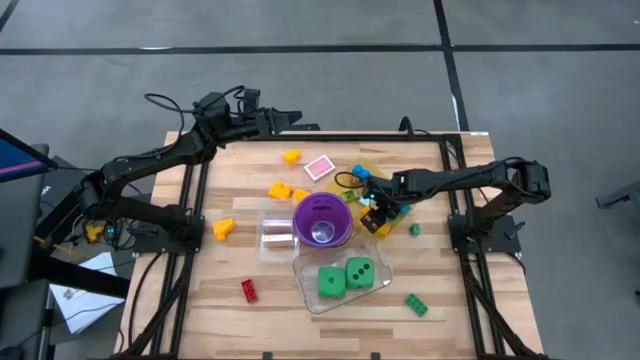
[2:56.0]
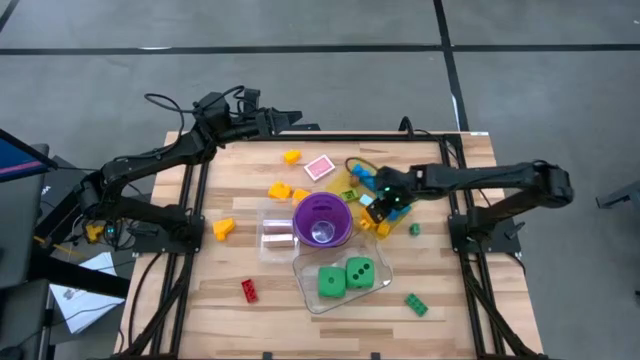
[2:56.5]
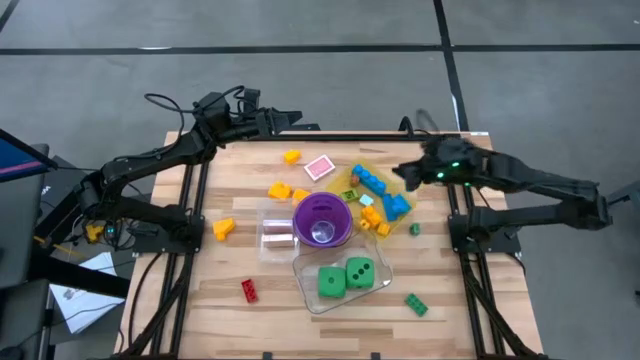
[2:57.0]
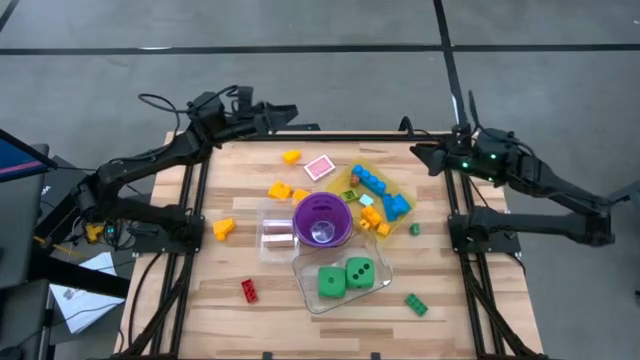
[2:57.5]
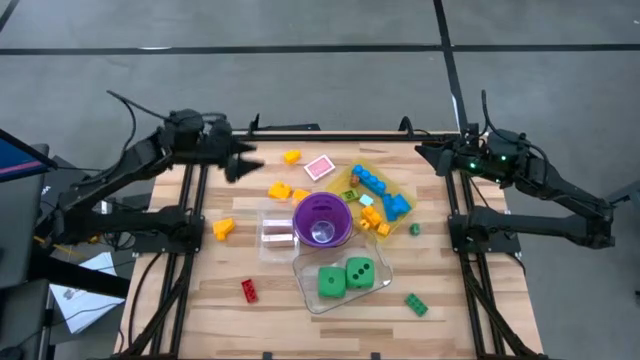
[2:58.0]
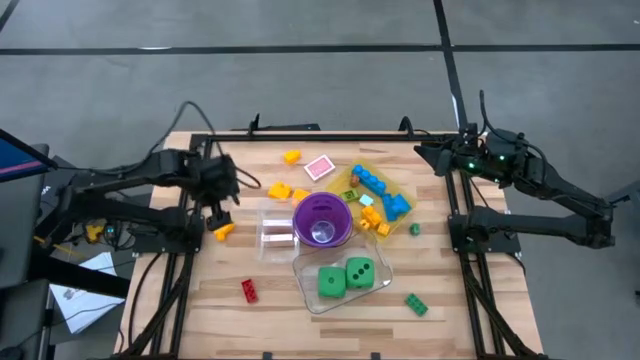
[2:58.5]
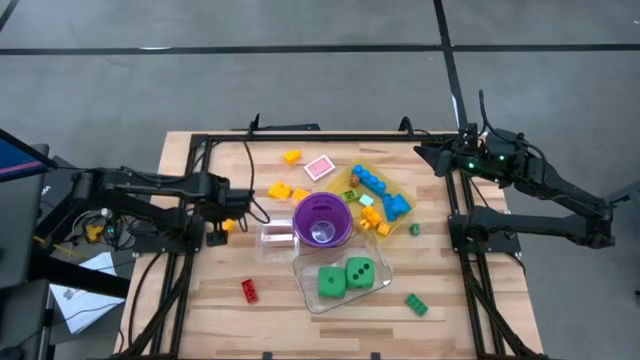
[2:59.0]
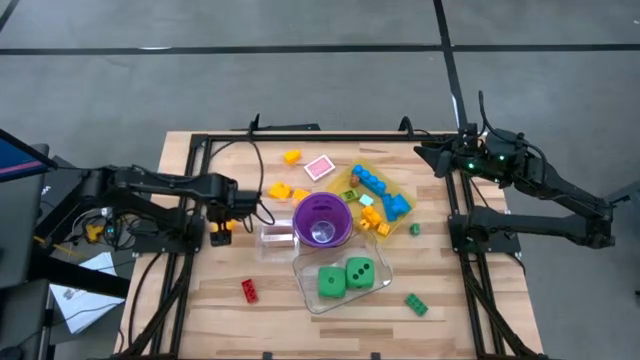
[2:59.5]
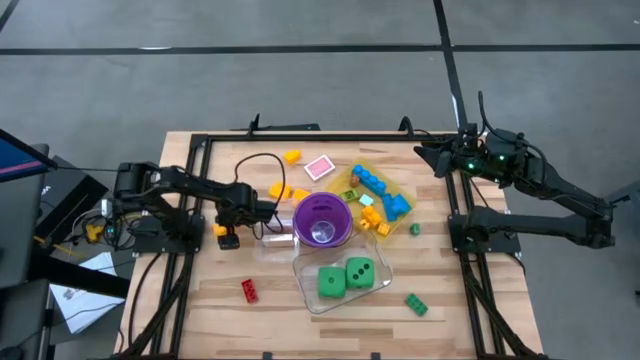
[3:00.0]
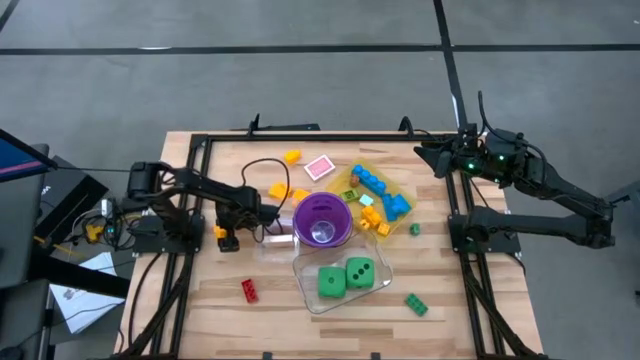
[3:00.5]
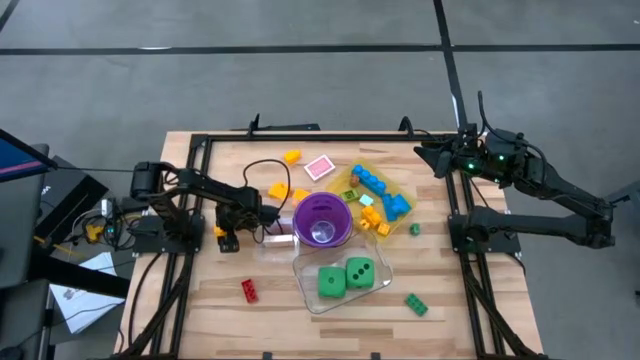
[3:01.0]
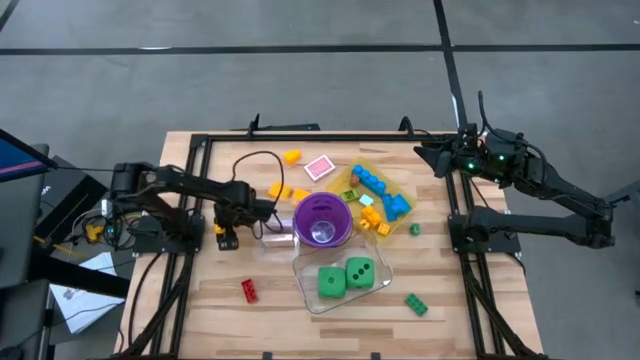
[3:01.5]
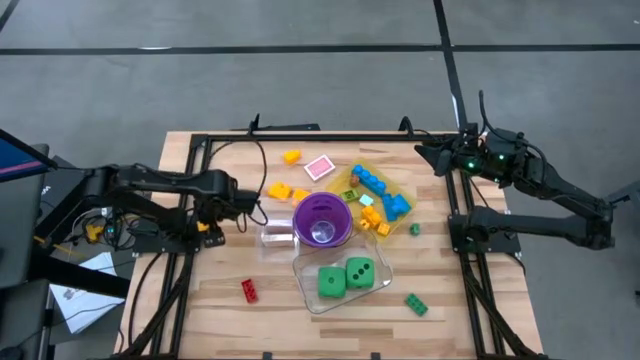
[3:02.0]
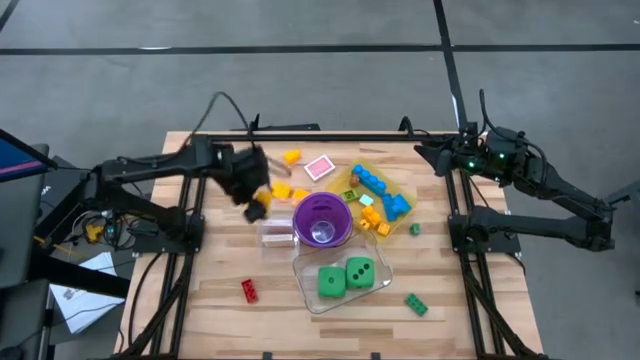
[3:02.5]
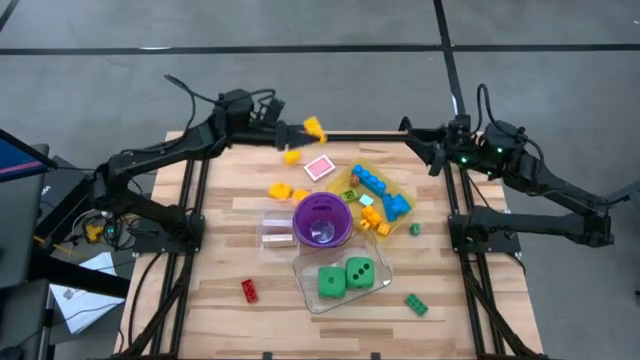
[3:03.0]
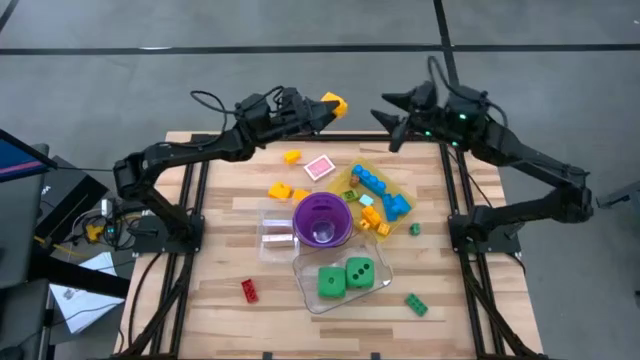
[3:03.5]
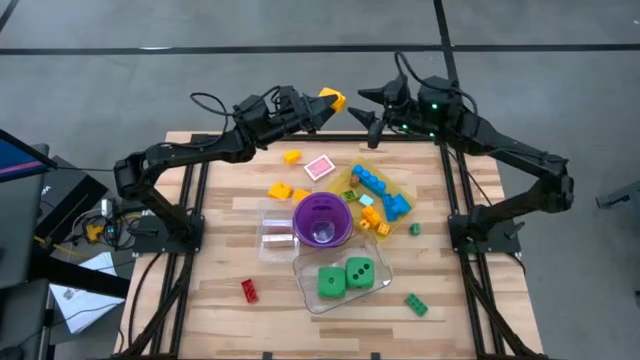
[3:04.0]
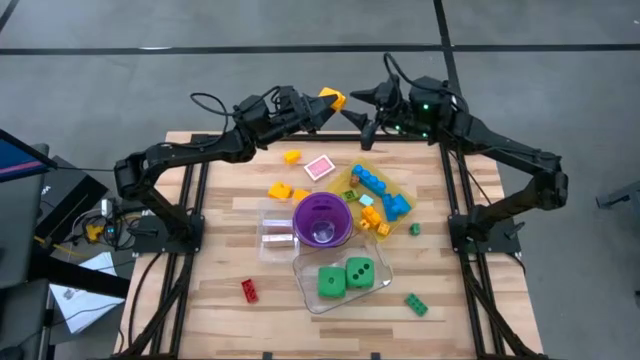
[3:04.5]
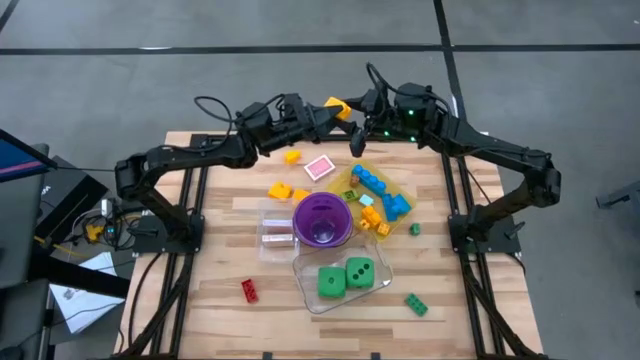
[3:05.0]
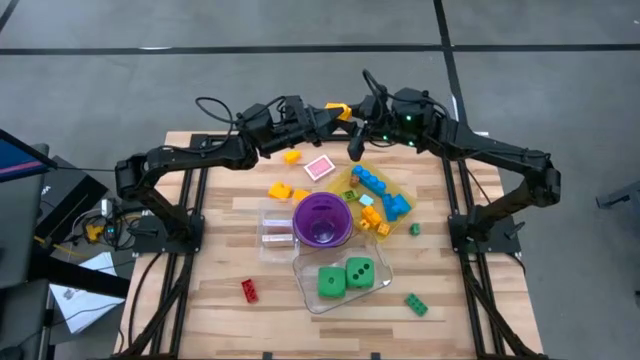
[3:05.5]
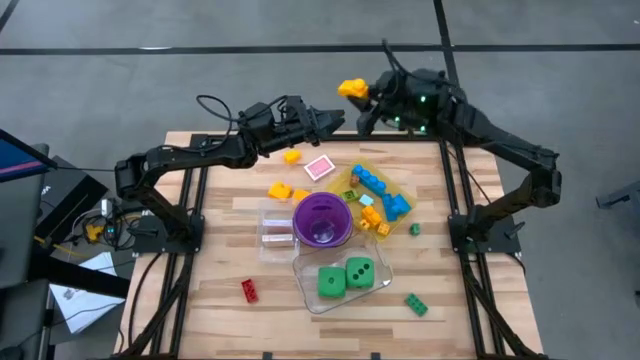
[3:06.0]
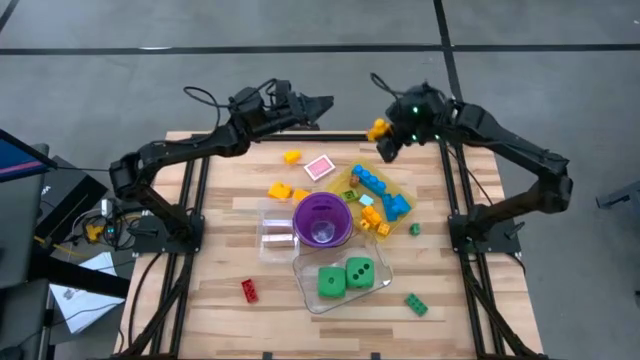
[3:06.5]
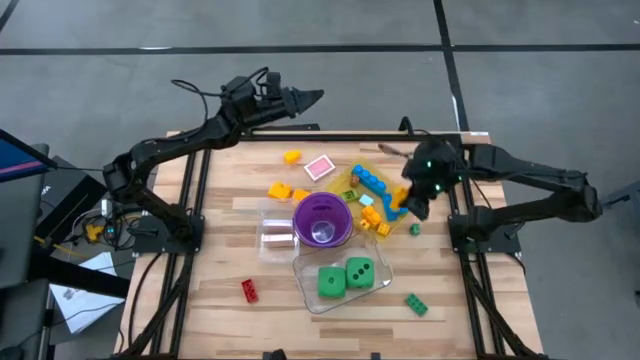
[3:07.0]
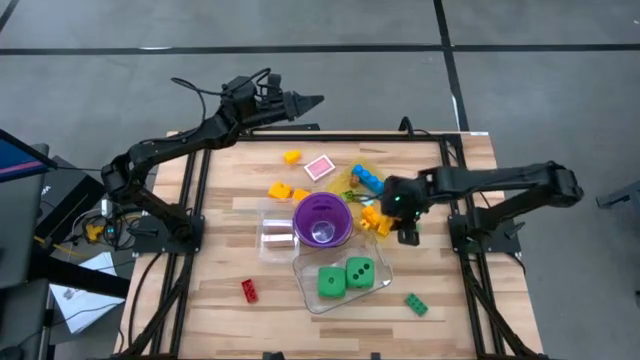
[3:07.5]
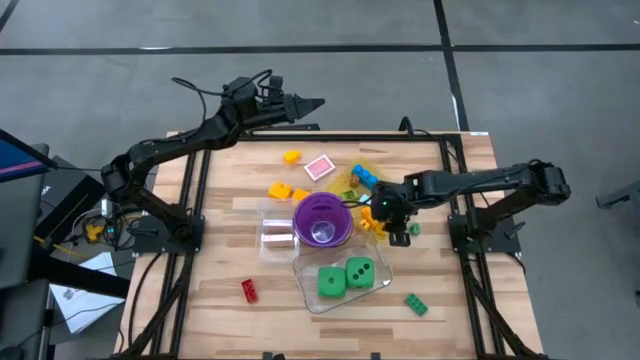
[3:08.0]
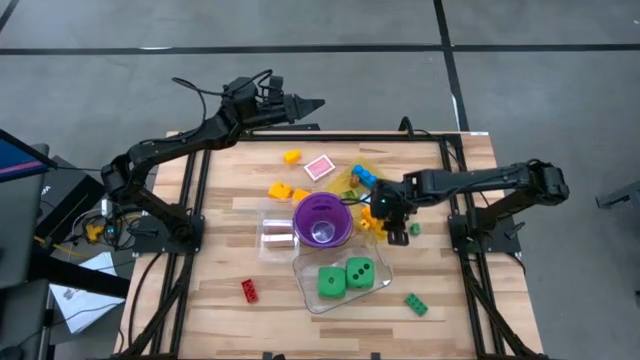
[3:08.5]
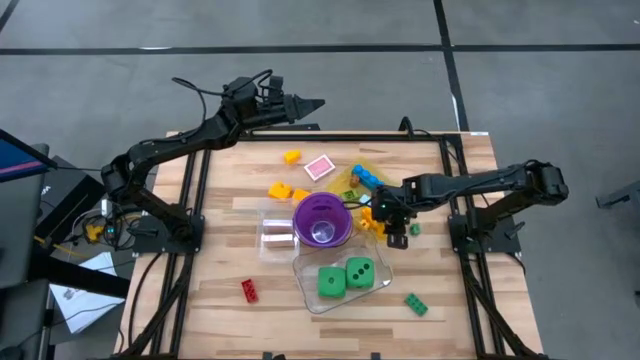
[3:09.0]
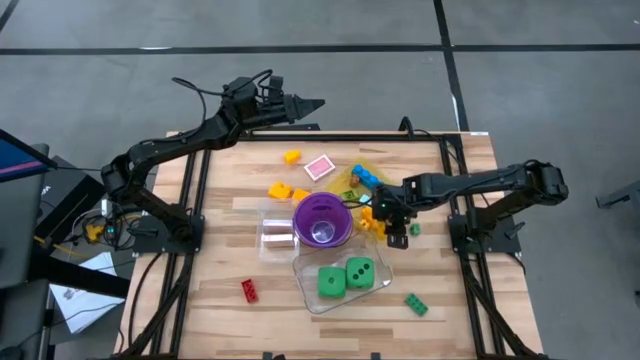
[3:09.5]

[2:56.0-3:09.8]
Task: Pick & Place Toys
Put the large yellow game piece into the yellow bin

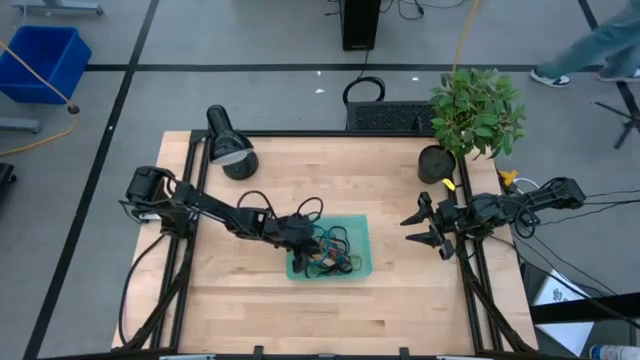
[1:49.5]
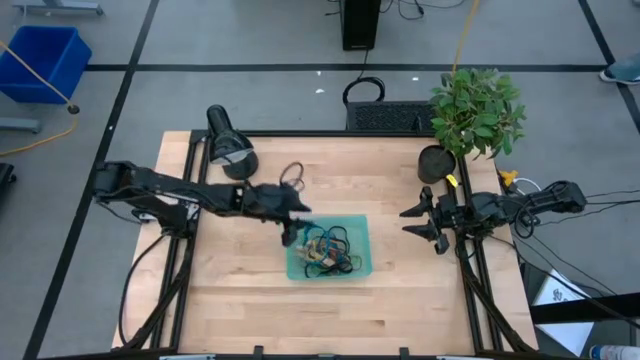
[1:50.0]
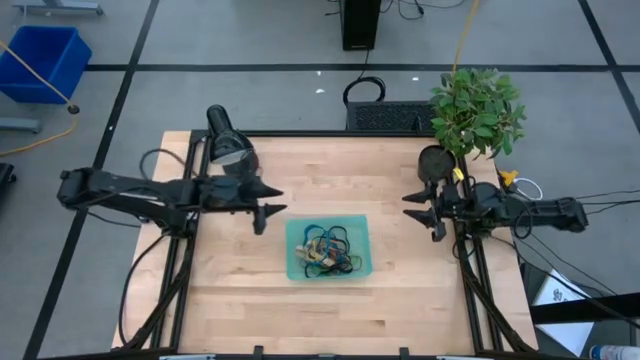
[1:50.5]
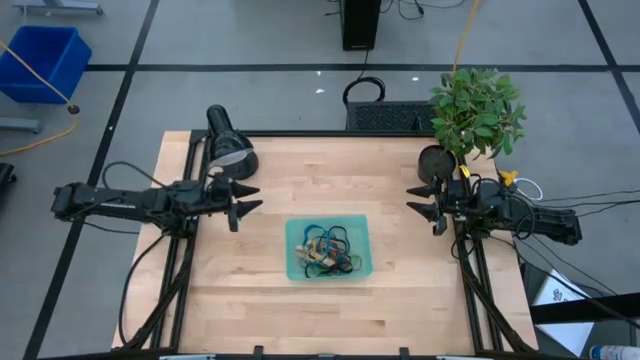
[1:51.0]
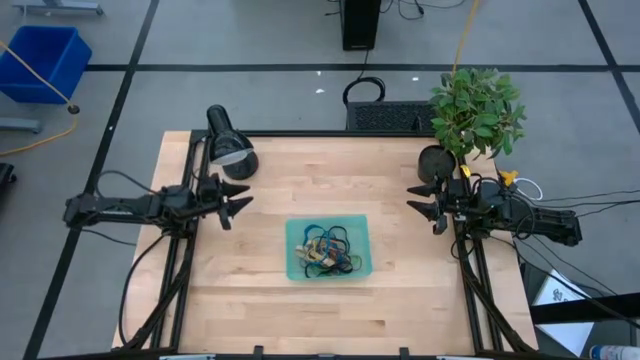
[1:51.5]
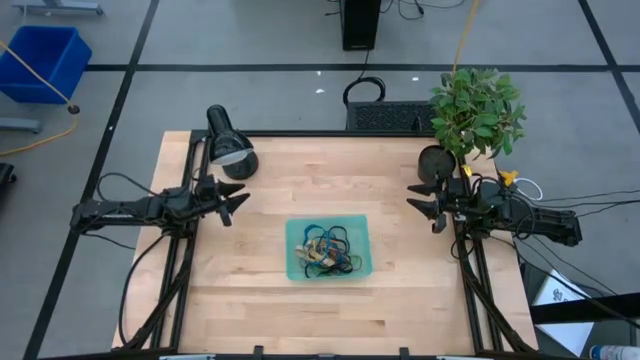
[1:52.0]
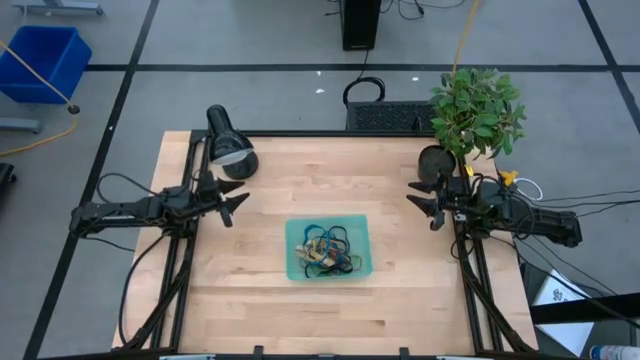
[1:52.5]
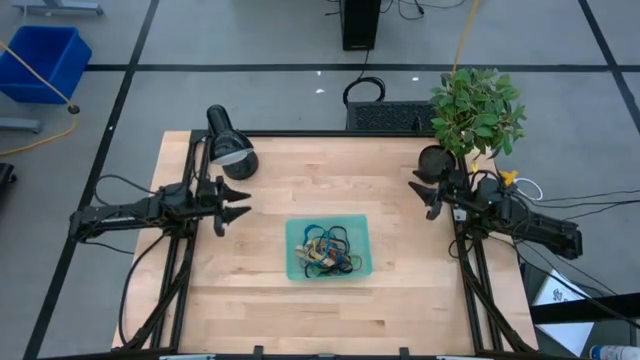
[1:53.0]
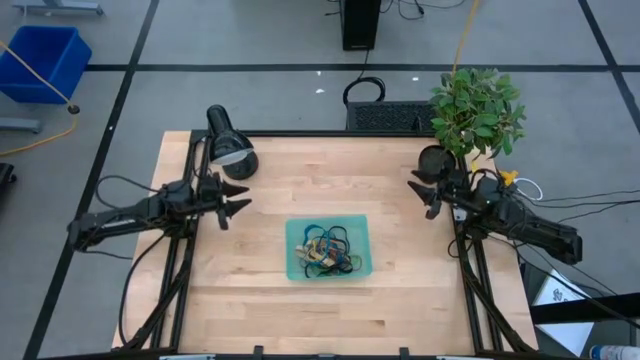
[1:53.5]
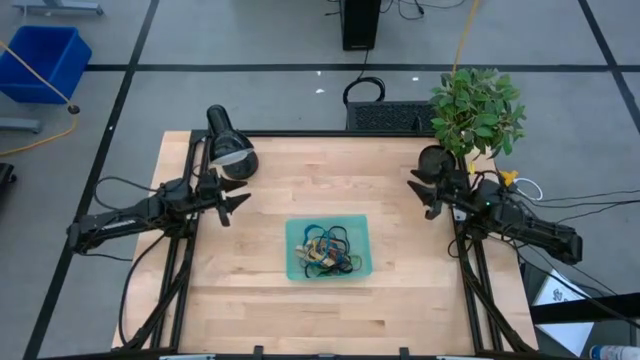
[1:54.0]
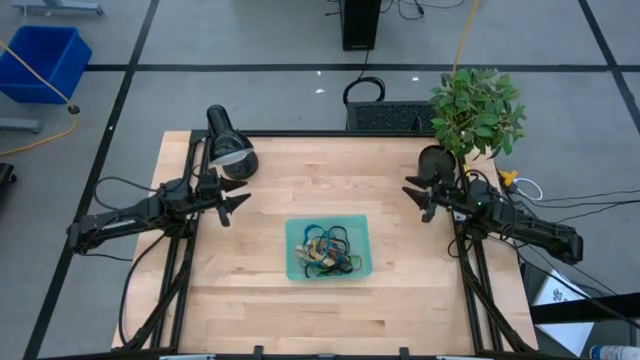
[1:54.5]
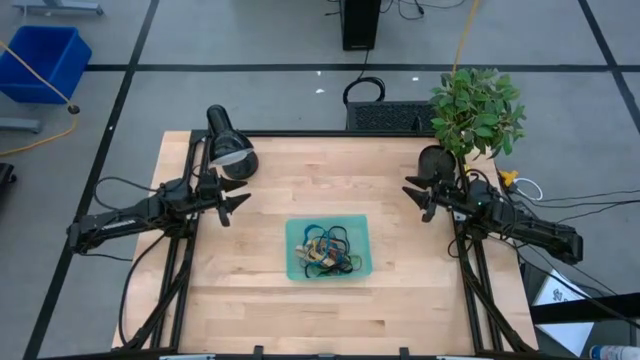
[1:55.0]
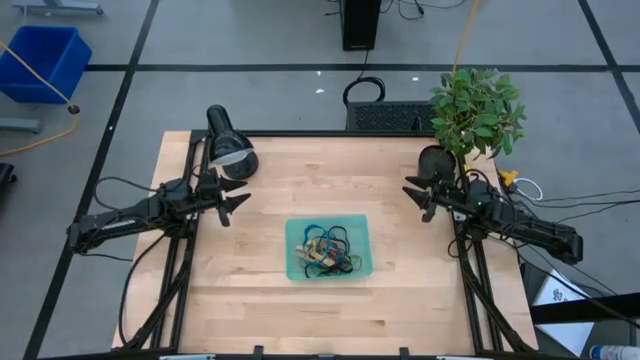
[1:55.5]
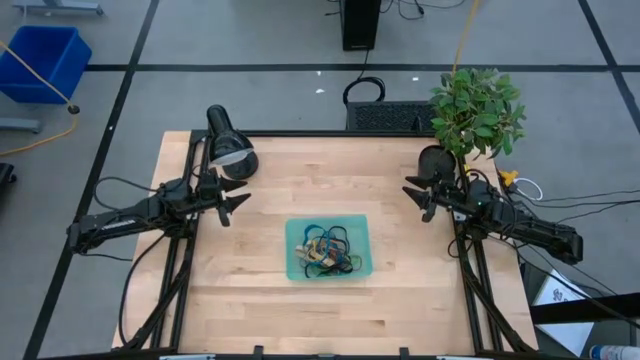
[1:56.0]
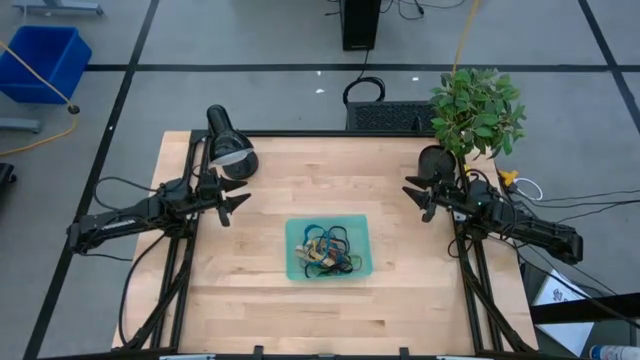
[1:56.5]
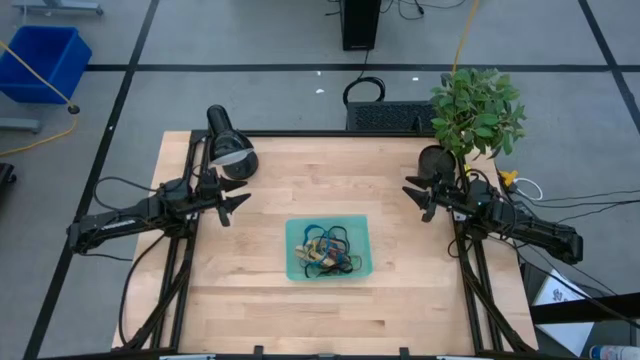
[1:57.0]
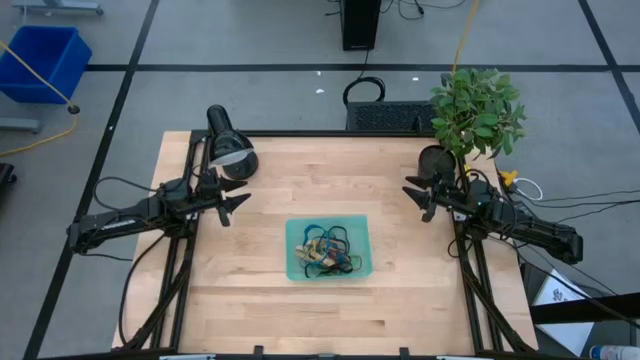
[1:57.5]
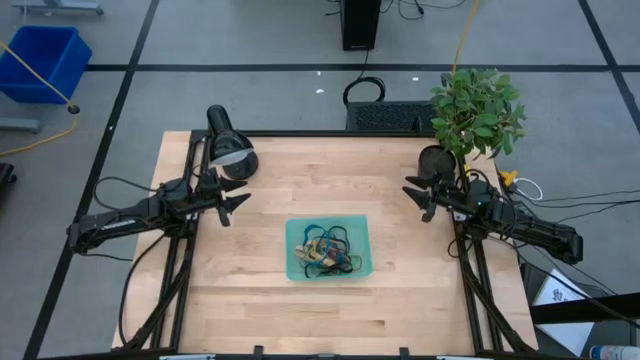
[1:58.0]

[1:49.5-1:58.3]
Task: Pick and place rubber bands into bin
Return to Home Position
